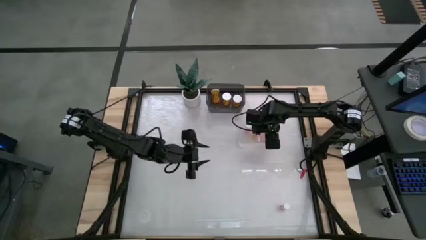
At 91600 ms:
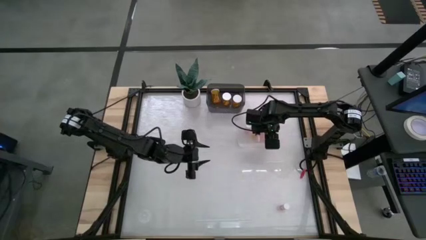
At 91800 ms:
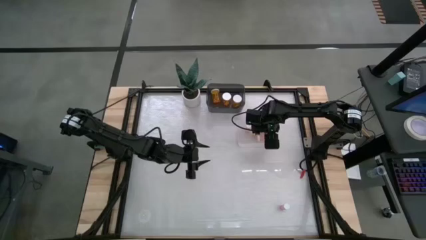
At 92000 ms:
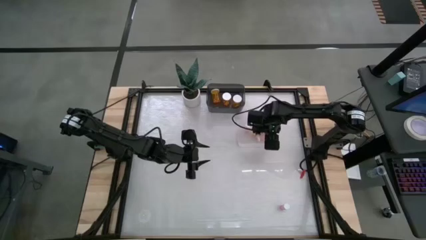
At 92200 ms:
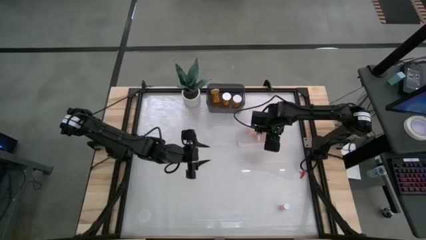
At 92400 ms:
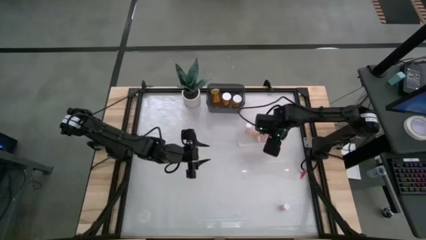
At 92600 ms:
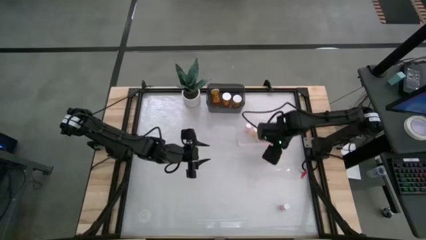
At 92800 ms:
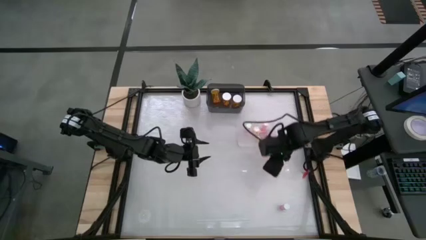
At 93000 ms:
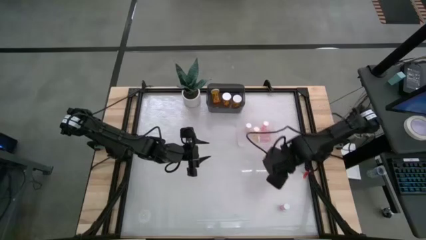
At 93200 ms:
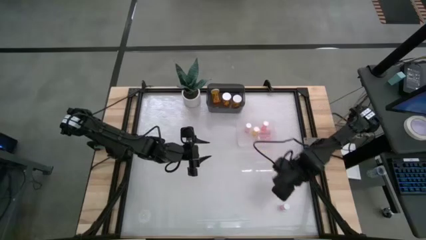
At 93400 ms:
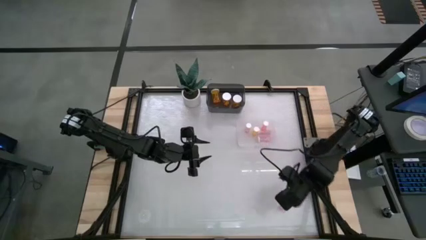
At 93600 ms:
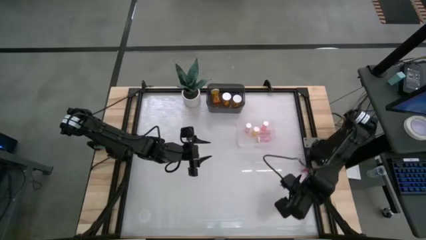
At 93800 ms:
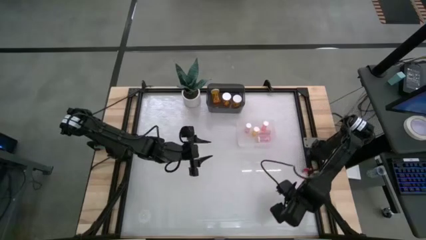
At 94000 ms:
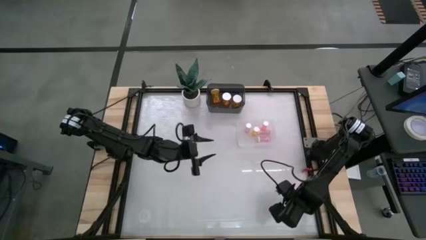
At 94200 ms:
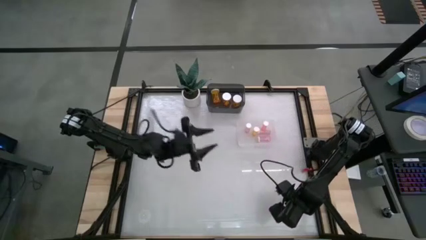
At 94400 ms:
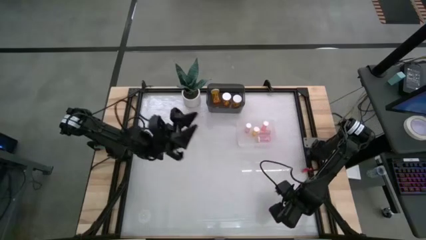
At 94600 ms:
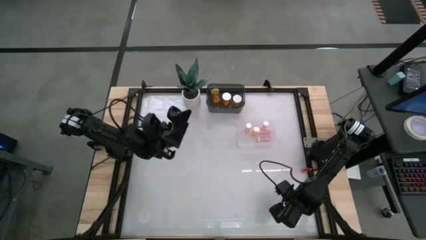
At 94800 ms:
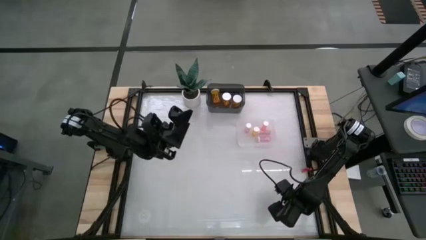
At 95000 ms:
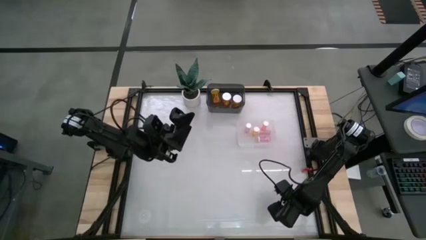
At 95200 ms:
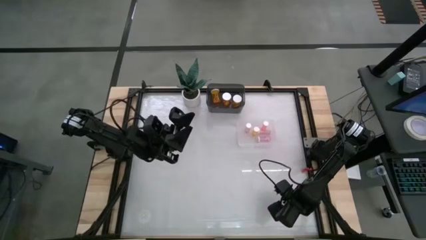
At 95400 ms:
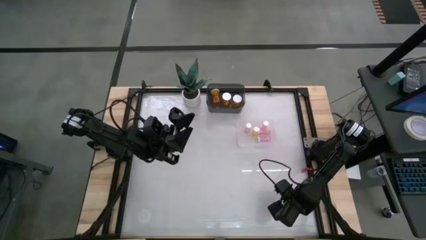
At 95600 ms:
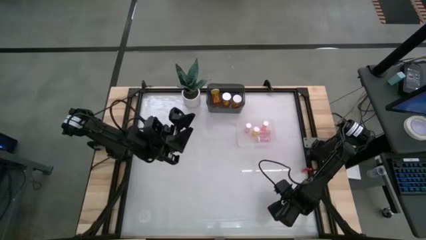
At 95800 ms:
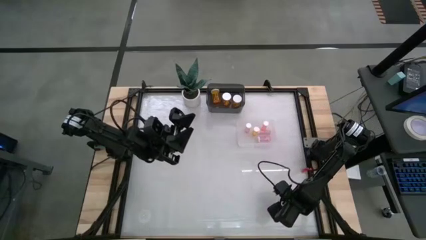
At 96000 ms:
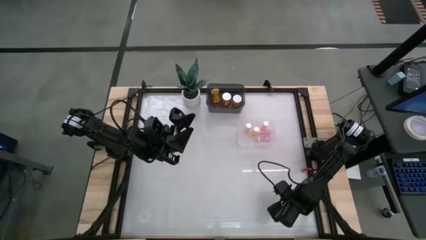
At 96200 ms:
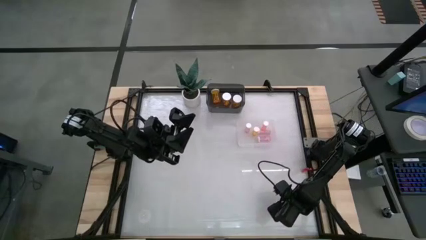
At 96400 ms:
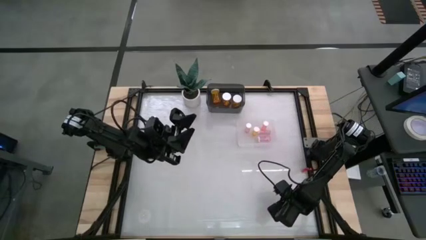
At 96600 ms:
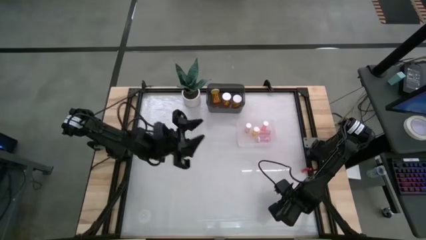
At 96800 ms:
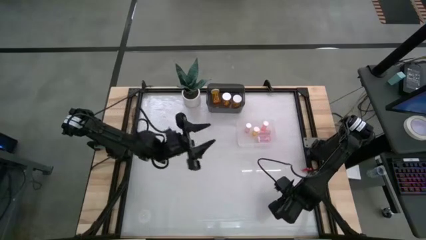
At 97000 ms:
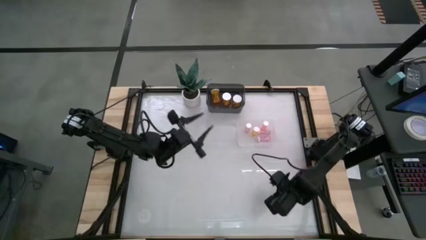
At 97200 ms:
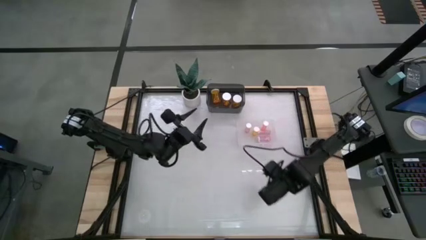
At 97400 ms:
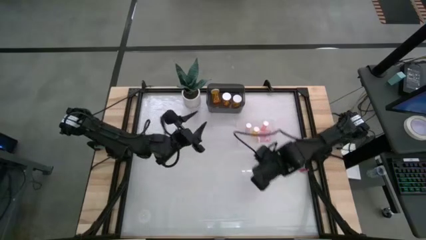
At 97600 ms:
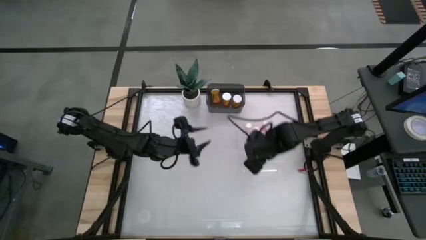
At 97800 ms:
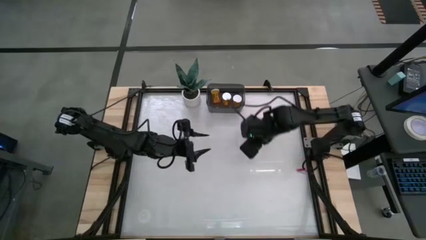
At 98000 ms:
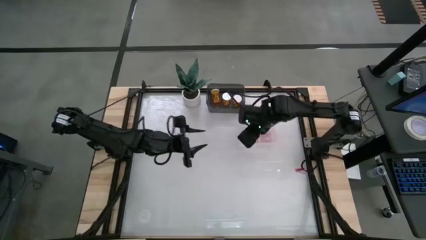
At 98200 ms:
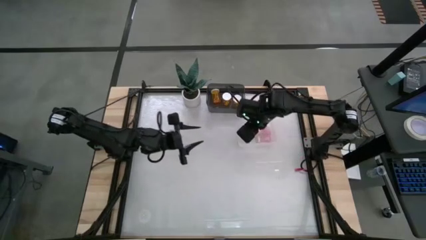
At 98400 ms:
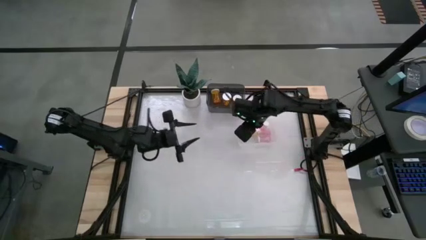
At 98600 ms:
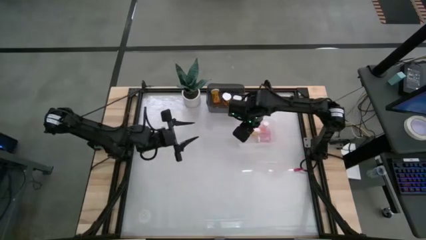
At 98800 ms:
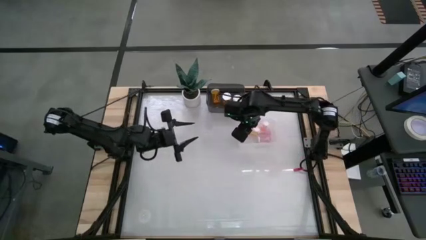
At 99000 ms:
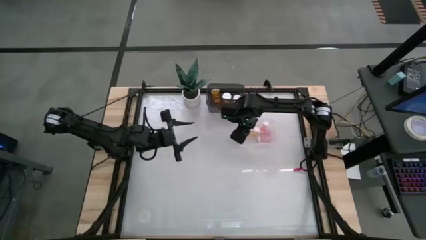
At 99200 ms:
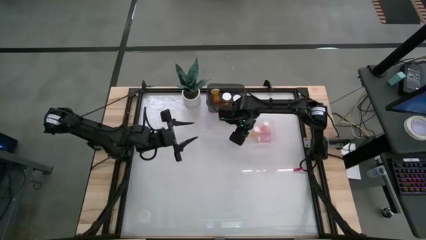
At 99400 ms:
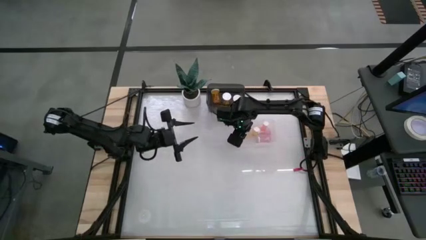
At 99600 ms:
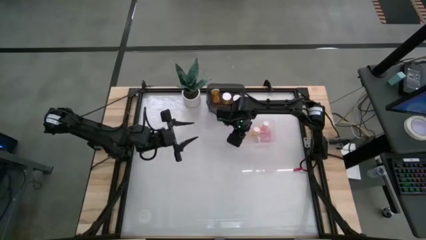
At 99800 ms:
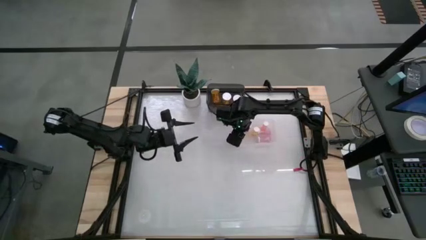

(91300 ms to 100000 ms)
Task: Pick and place medicine bottles into bin by pill shape (circle, oval)
Put the small pink pill bottle into the white bin

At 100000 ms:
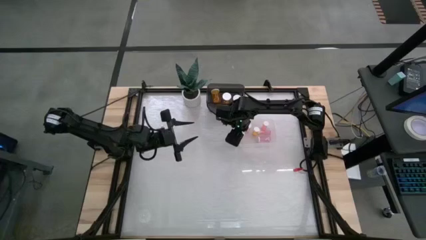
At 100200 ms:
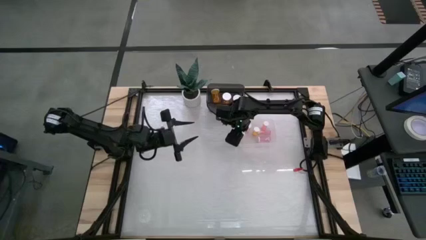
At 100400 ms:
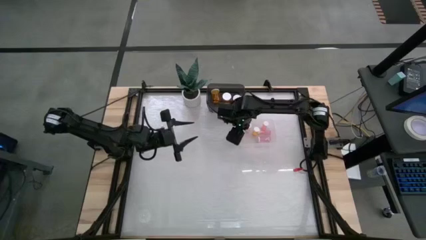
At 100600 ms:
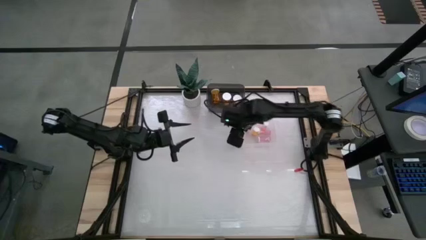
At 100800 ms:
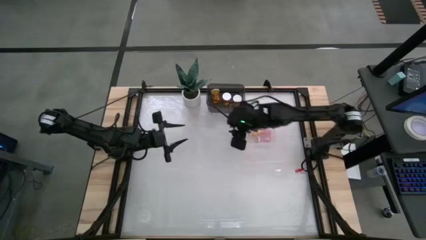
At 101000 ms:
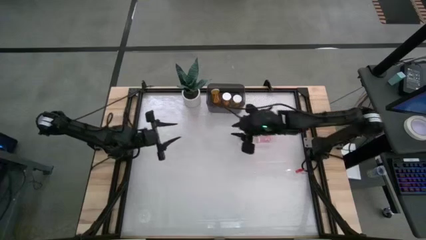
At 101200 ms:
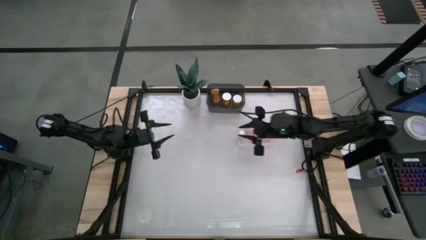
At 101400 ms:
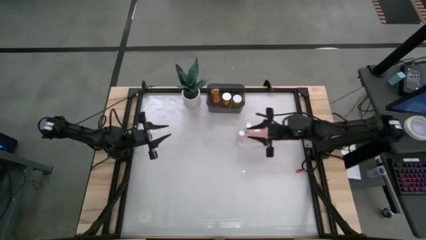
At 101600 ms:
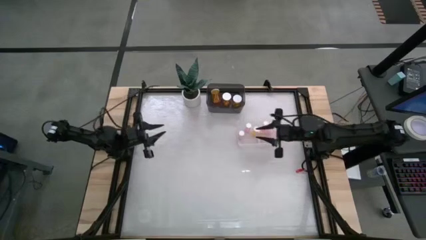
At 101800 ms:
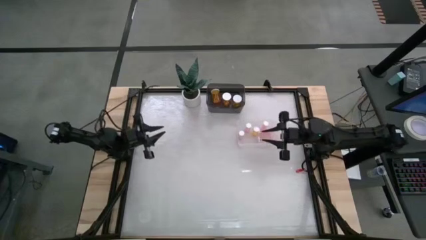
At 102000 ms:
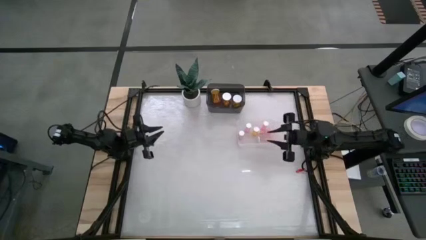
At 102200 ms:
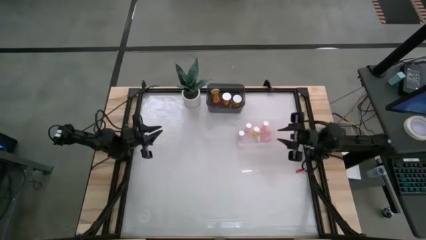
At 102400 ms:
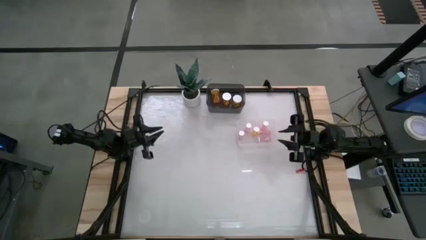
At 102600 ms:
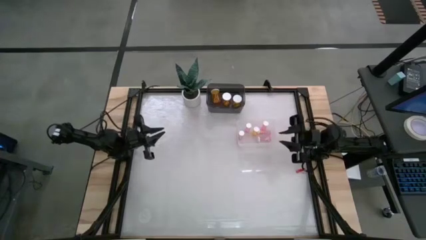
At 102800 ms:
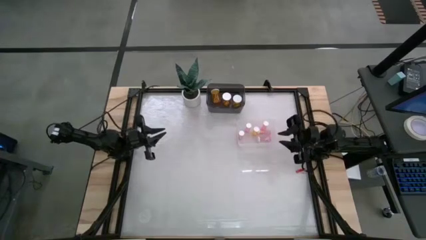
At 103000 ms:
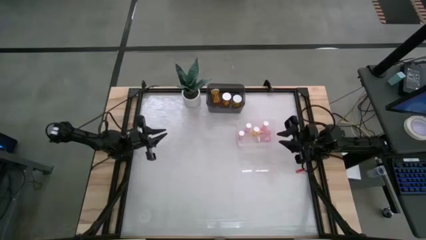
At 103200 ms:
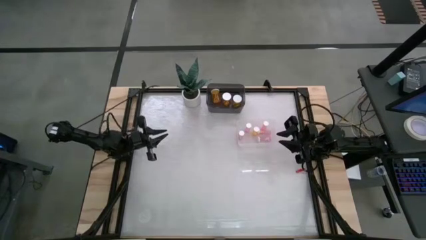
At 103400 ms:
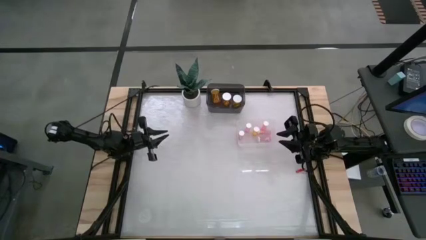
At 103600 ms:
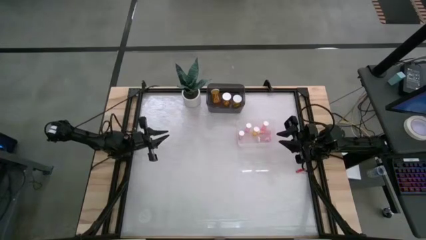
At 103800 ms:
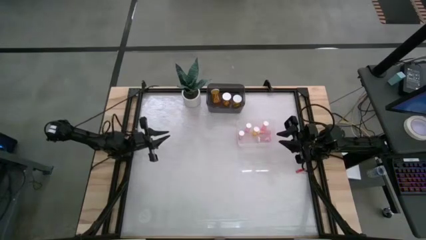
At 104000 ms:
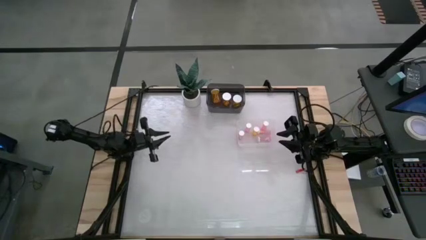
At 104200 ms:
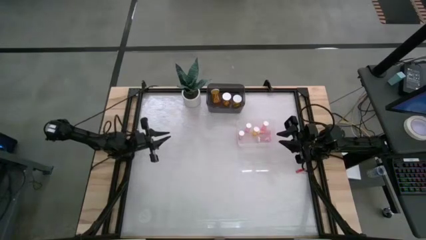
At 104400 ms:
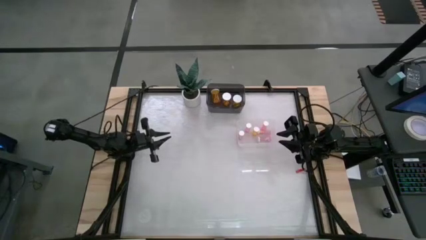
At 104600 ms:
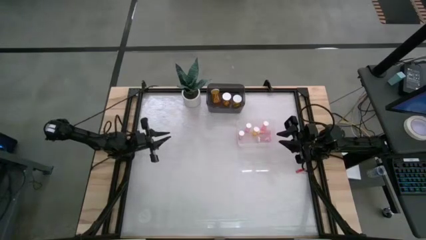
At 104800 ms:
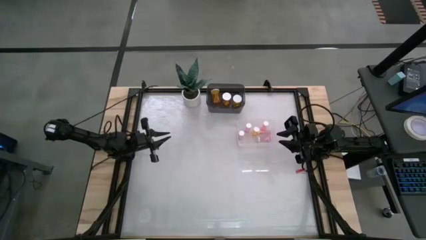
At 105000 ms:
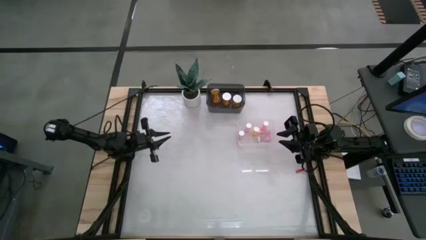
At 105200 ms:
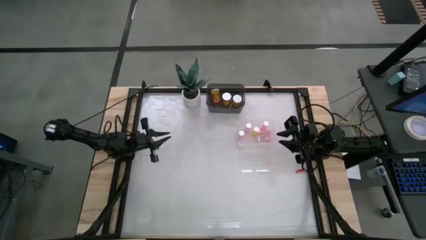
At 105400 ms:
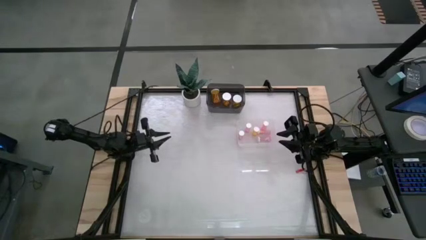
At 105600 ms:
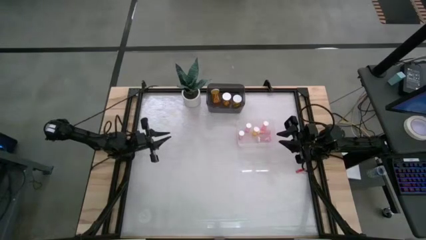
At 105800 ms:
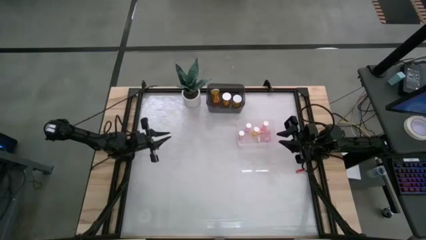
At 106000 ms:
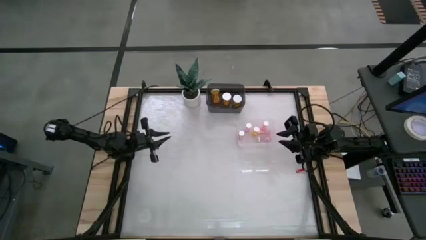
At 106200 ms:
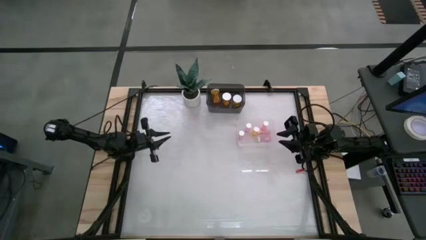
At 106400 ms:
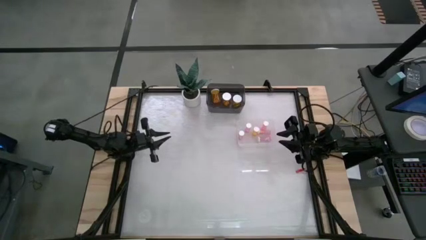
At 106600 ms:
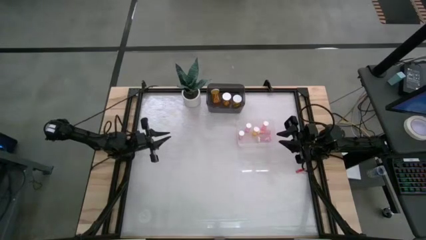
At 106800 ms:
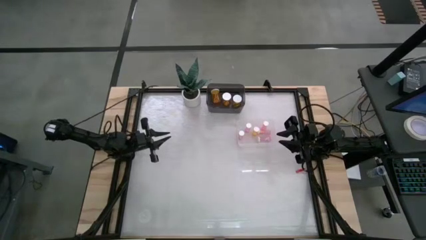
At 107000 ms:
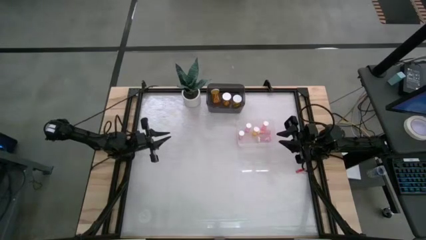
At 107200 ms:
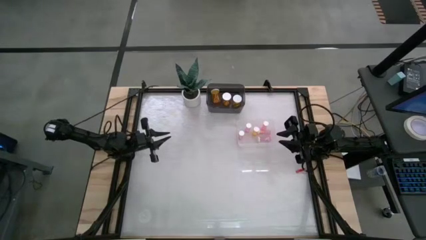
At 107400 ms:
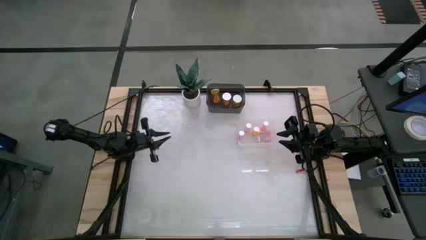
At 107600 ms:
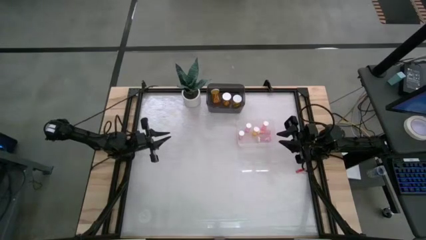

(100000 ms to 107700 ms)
Return to Home Position

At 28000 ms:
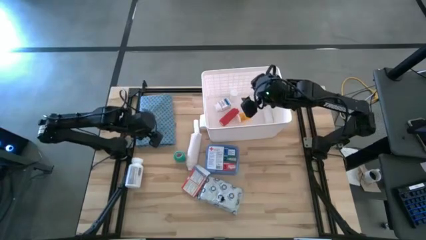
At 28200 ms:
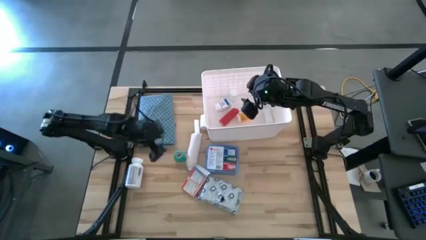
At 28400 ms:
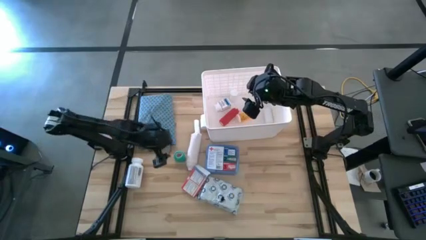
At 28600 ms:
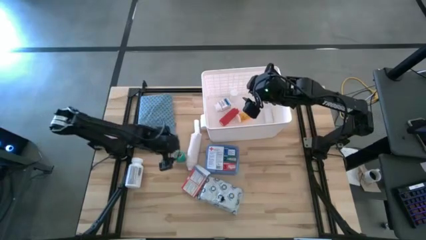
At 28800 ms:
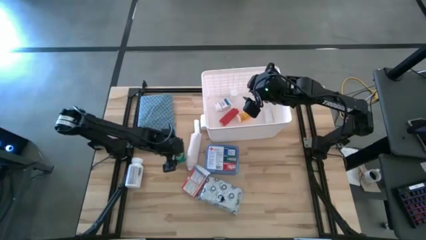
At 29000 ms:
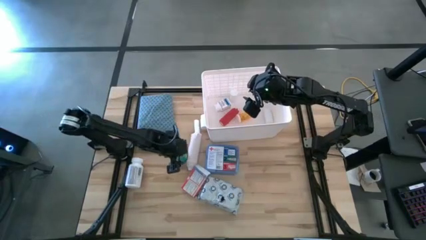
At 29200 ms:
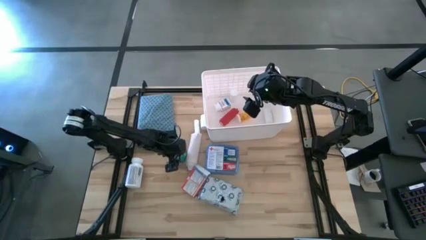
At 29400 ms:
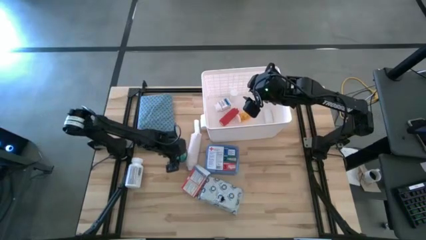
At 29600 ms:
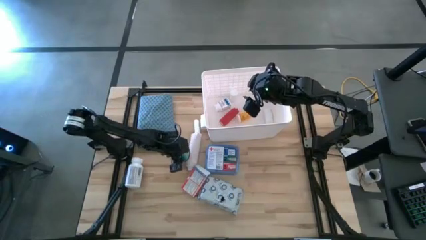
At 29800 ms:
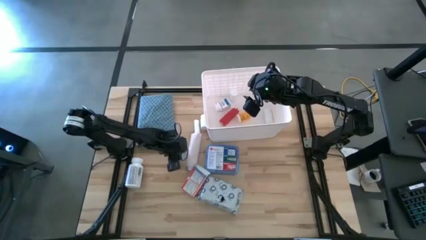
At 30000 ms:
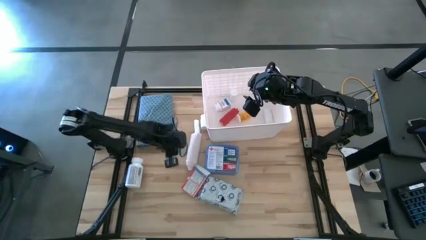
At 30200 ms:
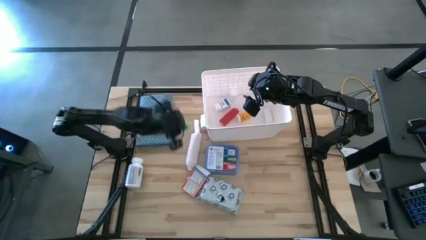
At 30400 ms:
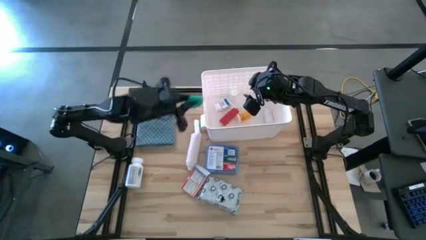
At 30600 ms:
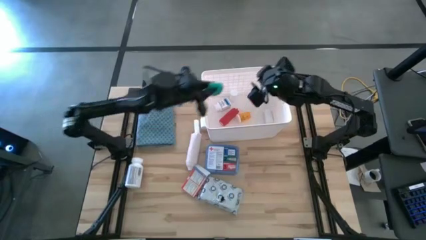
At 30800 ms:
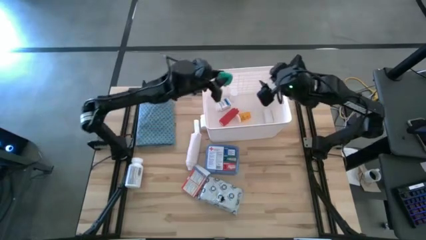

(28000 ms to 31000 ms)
Task: Pick & place medical supplies in basket/bin
Put the green bandage into the white bin
